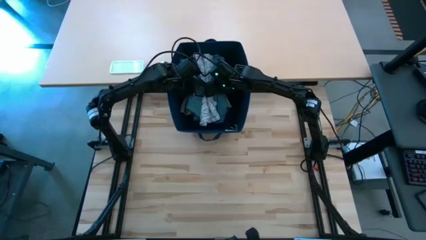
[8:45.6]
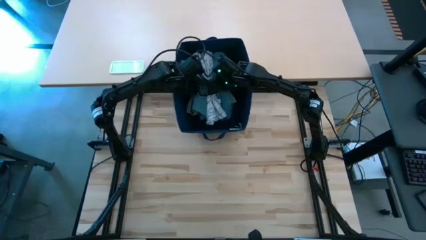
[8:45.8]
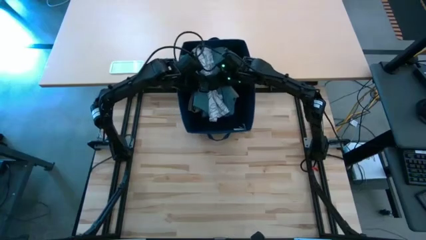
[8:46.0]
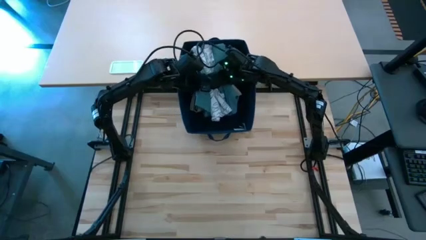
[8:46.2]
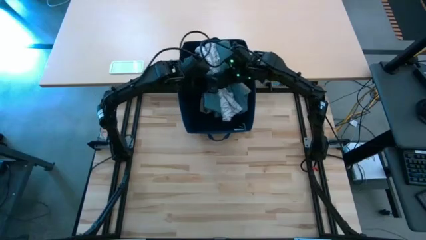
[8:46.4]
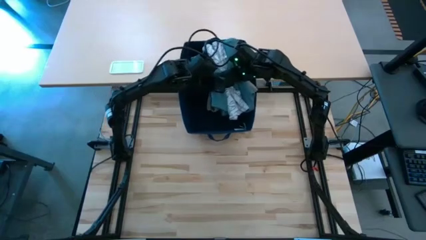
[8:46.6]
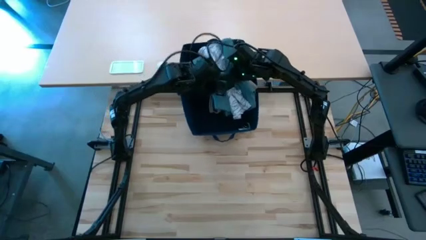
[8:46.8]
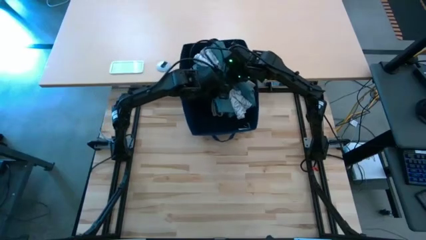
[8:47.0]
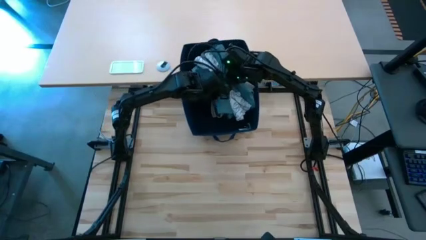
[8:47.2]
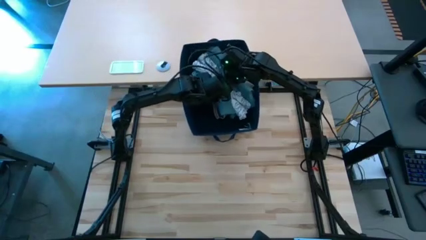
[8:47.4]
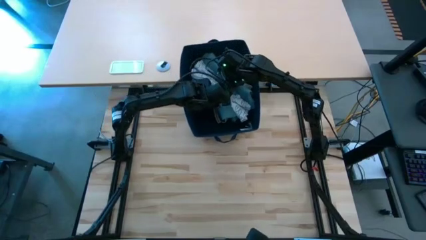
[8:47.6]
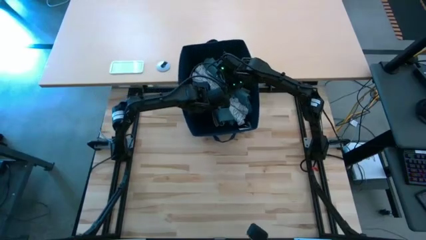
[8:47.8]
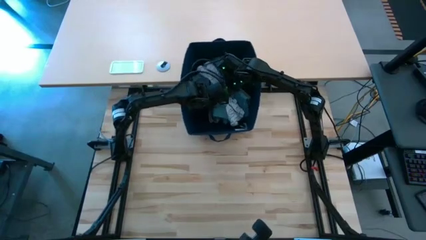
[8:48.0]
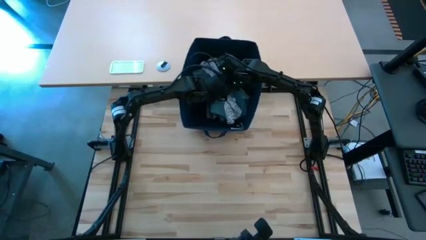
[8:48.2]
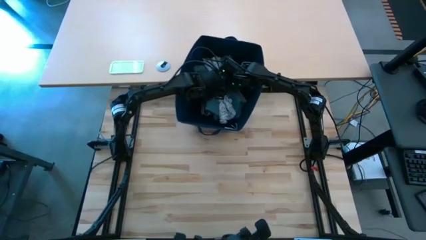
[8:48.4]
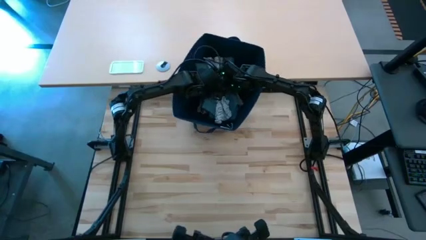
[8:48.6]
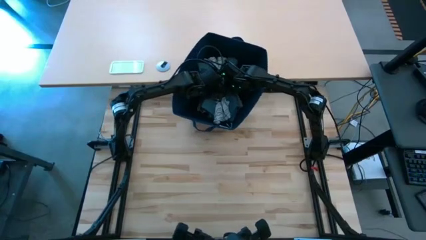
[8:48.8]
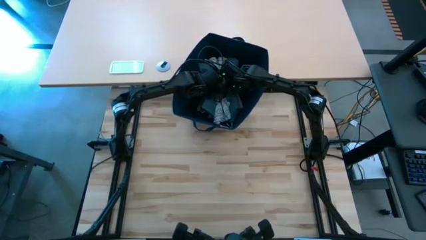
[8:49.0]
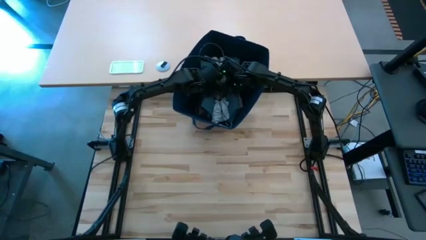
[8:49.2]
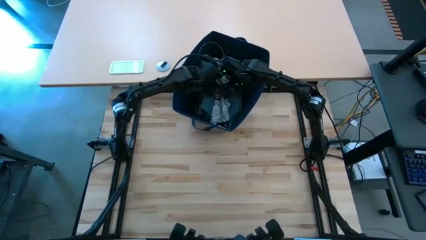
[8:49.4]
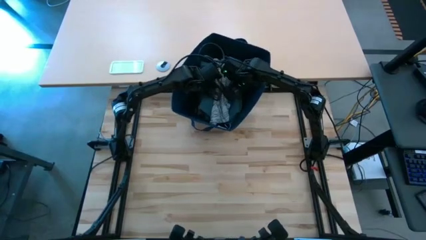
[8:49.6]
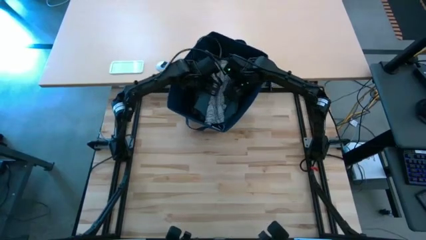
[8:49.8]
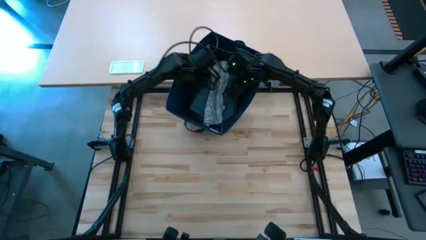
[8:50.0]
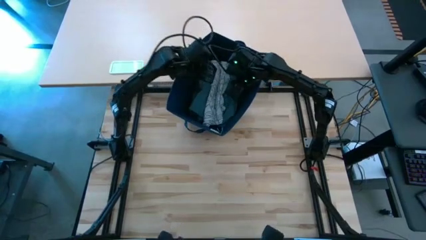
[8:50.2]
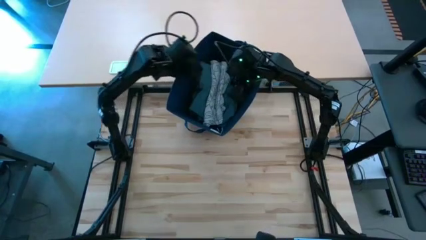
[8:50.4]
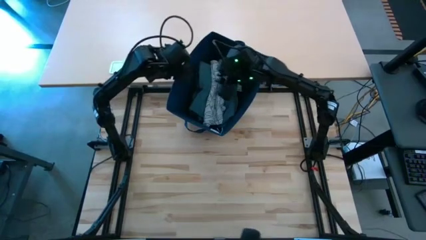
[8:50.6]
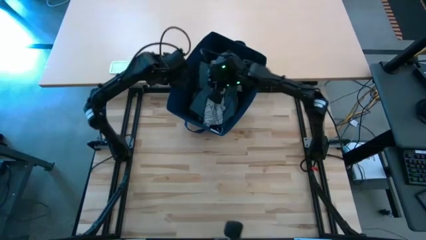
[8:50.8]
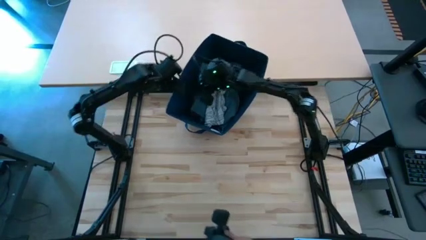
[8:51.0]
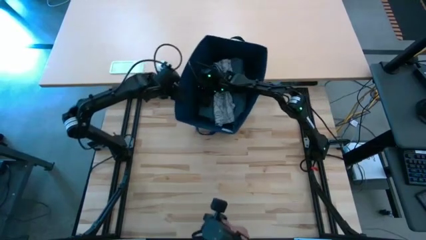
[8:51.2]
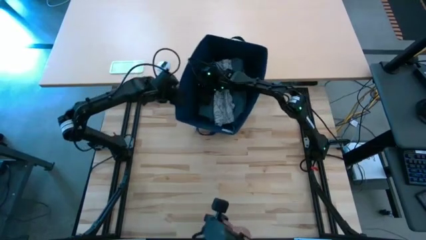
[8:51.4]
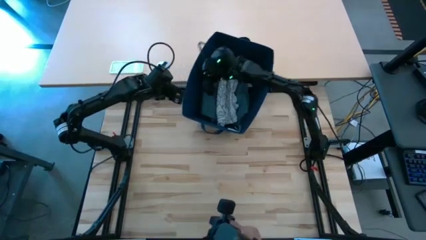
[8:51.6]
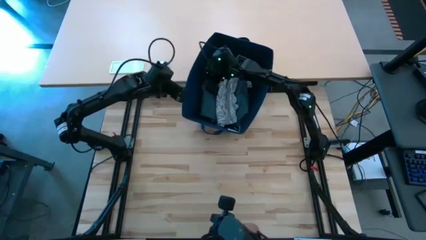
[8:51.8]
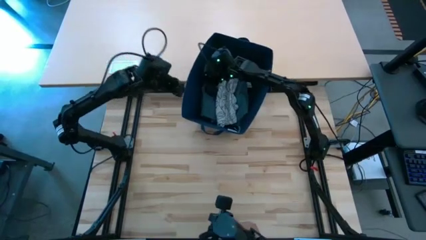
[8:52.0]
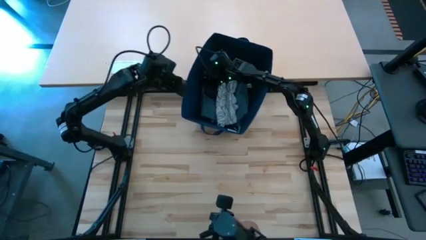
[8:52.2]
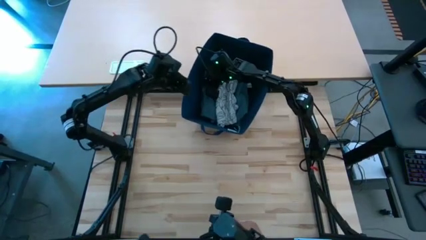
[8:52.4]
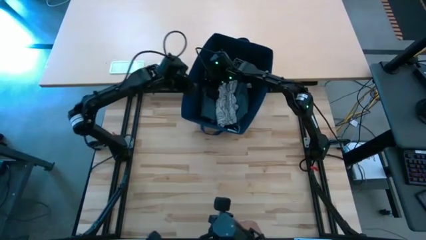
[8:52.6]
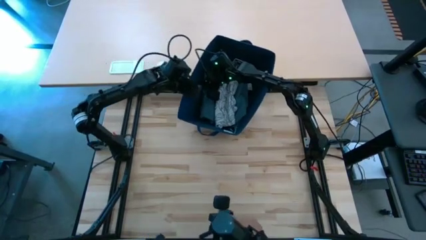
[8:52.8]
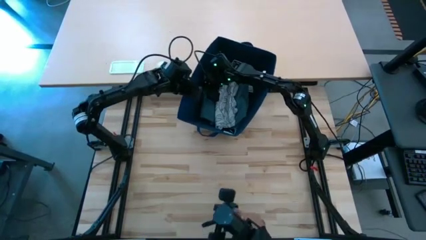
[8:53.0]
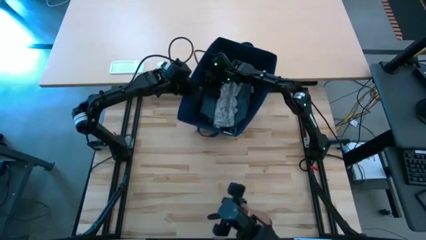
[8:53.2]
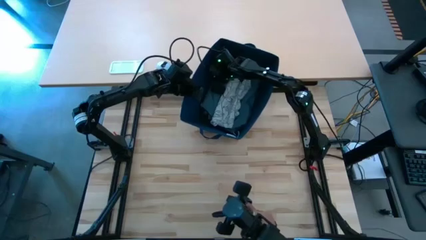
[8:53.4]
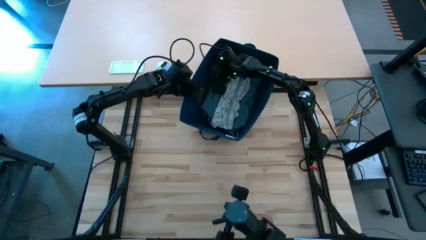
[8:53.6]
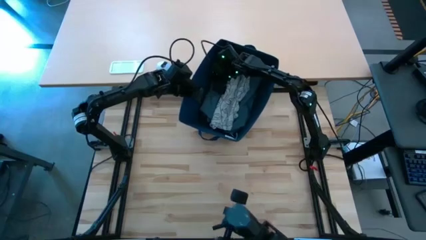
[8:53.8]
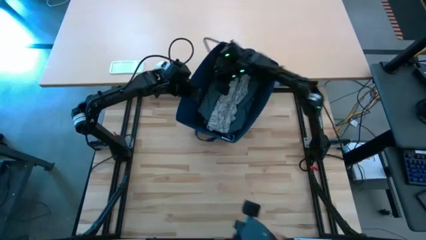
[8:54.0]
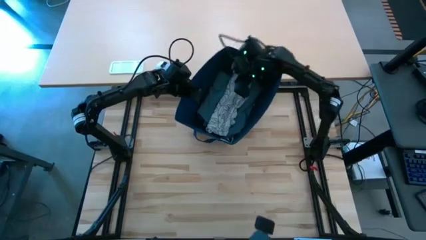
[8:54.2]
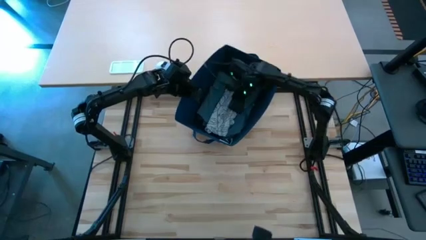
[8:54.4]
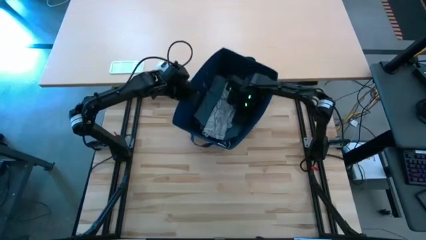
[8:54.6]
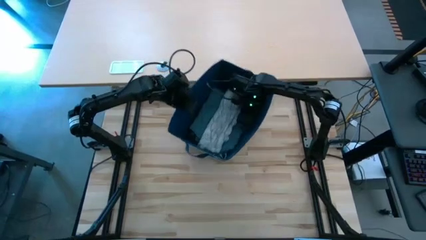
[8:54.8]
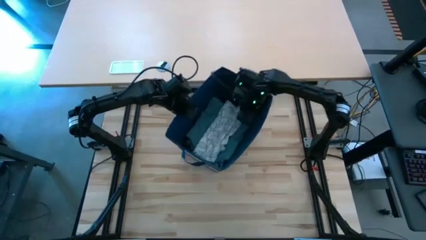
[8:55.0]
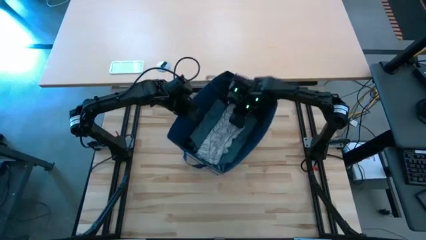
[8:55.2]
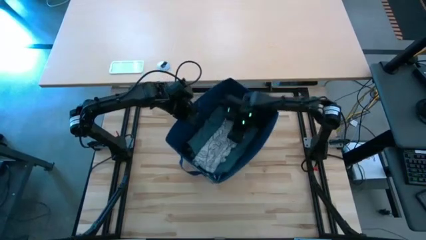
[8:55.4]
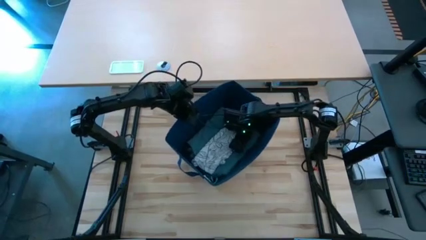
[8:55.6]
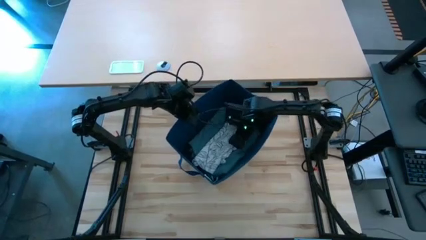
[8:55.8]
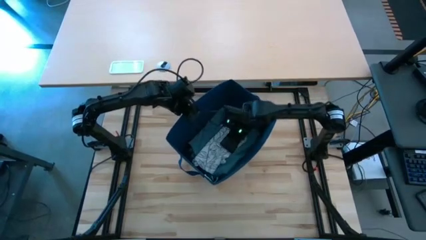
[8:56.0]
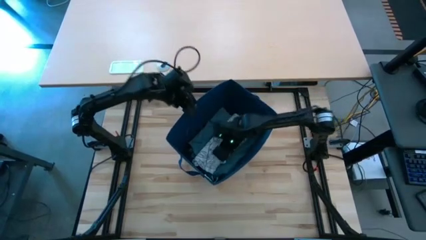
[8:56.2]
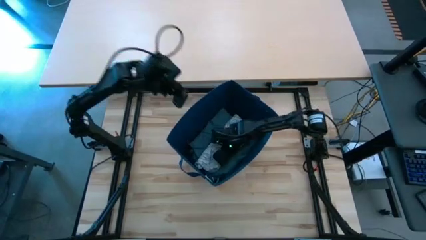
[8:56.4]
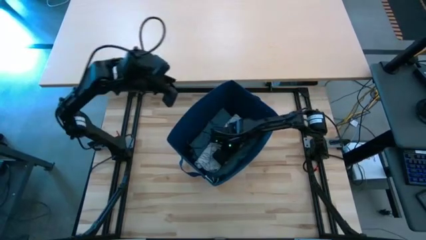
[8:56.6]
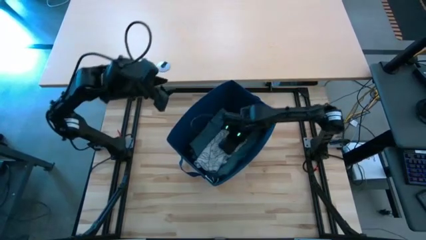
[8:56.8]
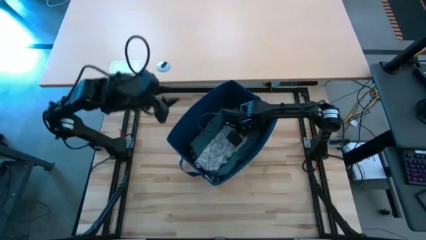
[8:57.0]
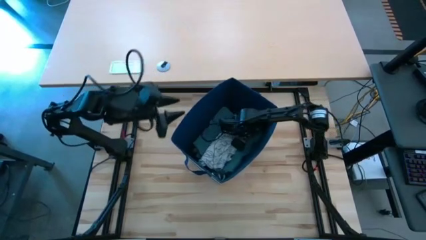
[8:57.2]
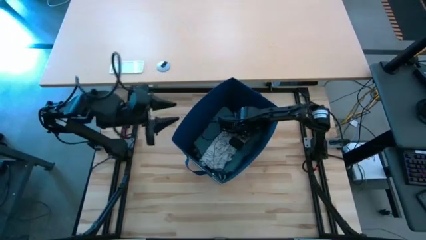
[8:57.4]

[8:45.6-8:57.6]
Task: Fold Laundry from Bin
Put the folded clothes into the blue laundry basket

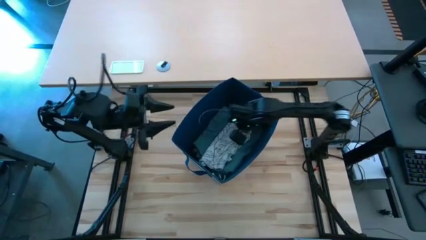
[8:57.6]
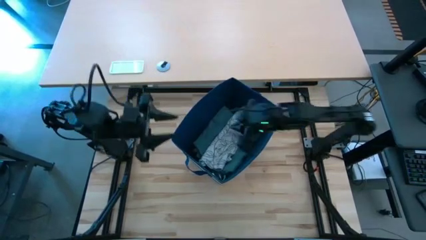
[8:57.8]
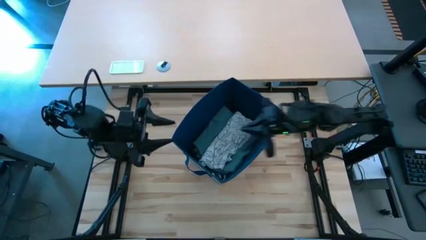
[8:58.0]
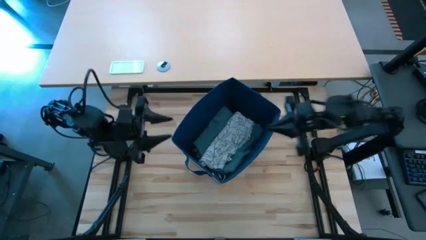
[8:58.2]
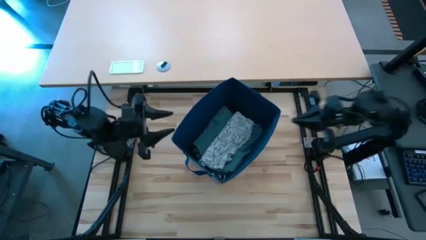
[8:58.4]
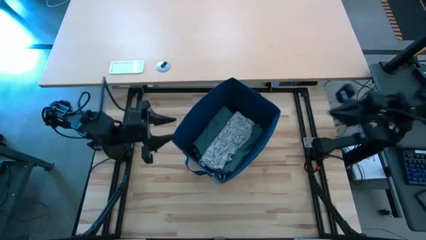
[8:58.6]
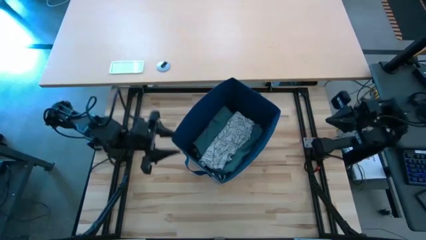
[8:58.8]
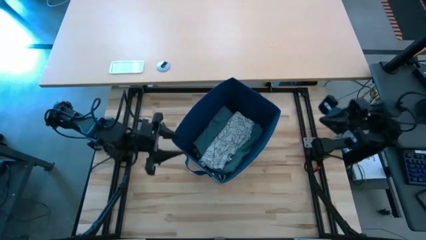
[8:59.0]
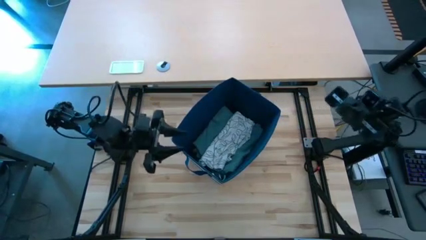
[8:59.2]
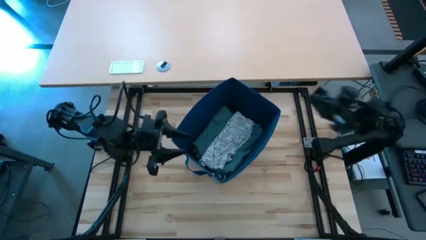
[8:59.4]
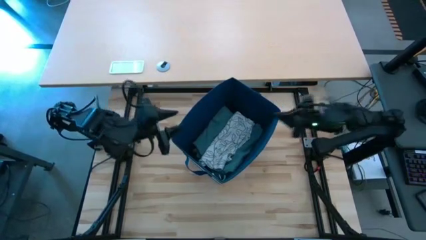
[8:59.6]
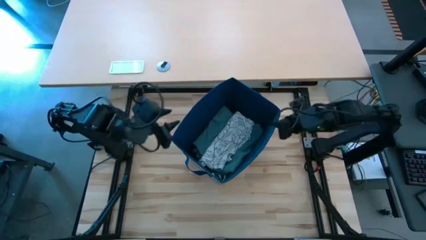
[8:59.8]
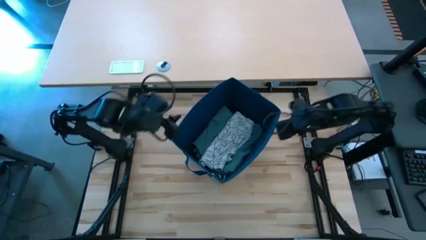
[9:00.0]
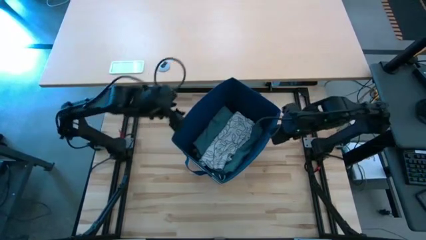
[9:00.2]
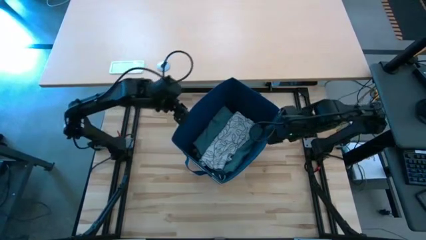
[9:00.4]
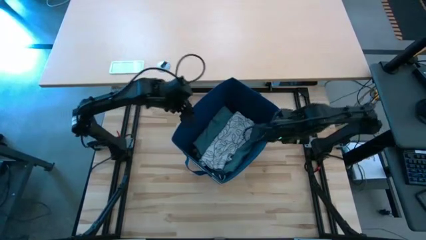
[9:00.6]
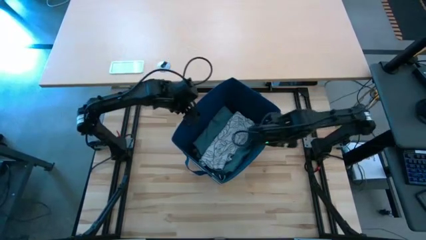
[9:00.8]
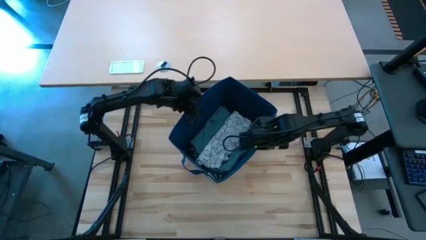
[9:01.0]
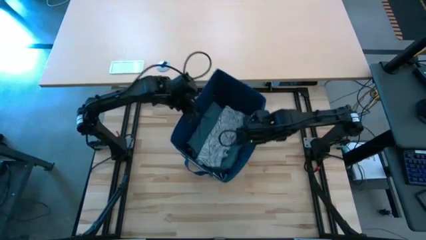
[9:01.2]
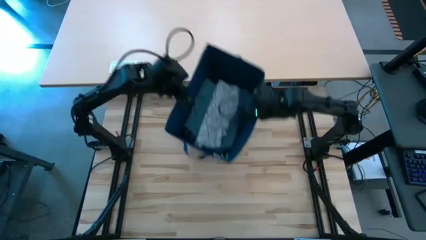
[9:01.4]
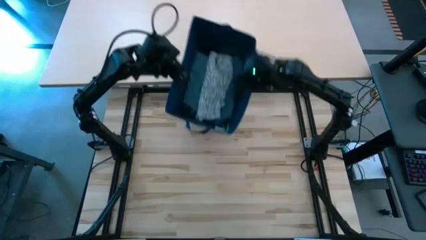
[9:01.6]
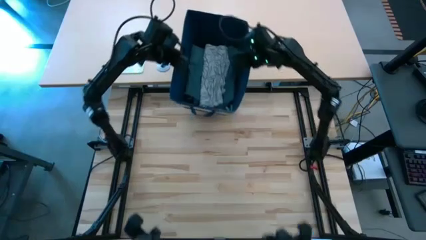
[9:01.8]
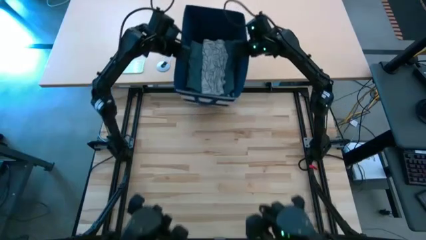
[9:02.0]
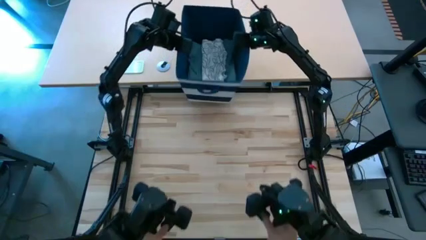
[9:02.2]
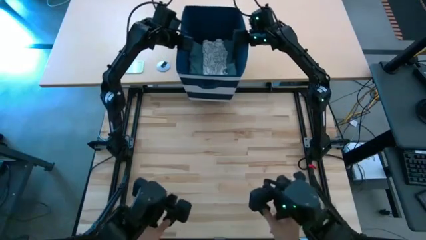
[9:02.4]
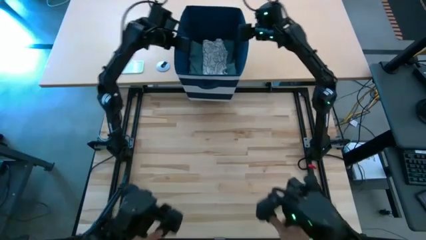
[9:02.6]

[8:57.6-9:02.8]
Move the blue laundry basket out of the table
